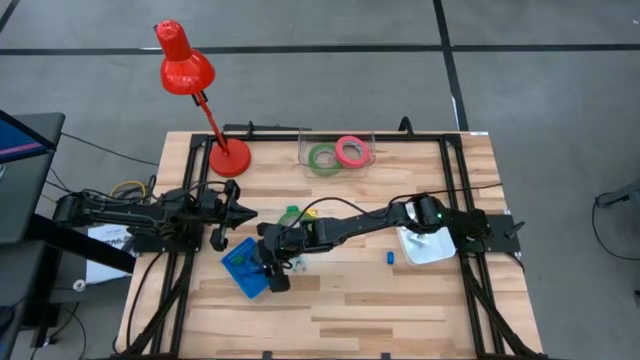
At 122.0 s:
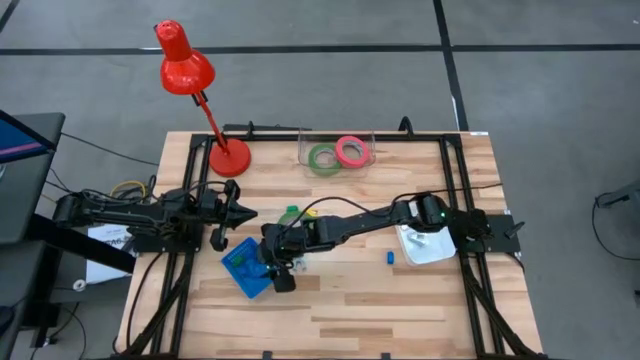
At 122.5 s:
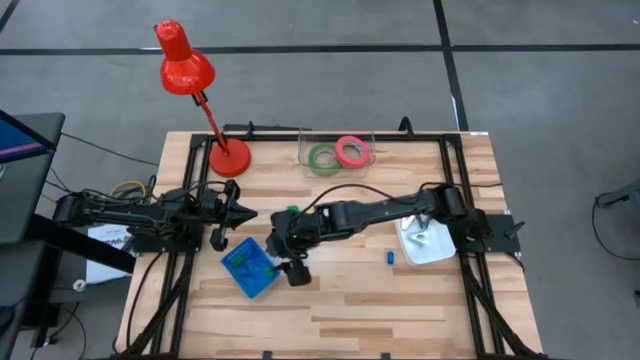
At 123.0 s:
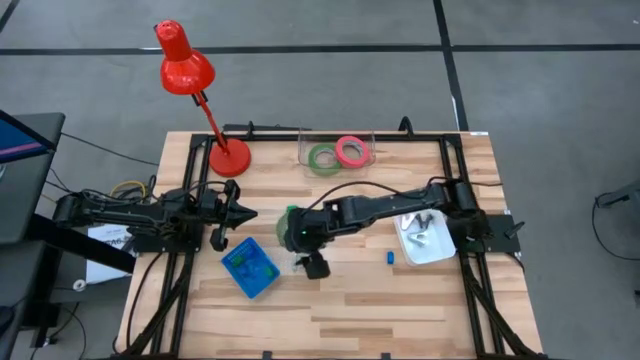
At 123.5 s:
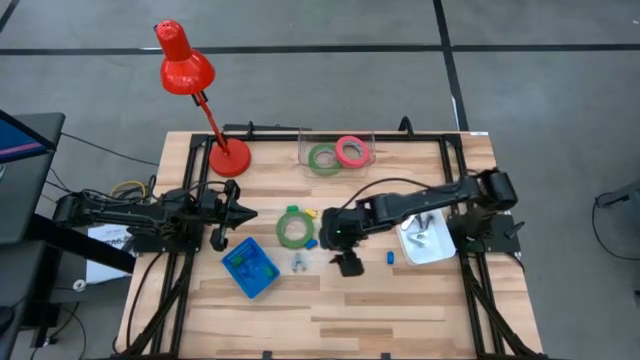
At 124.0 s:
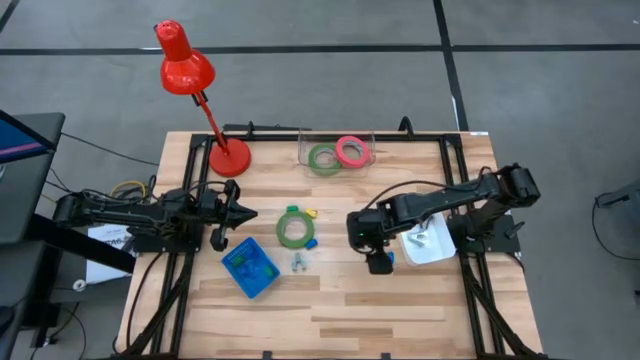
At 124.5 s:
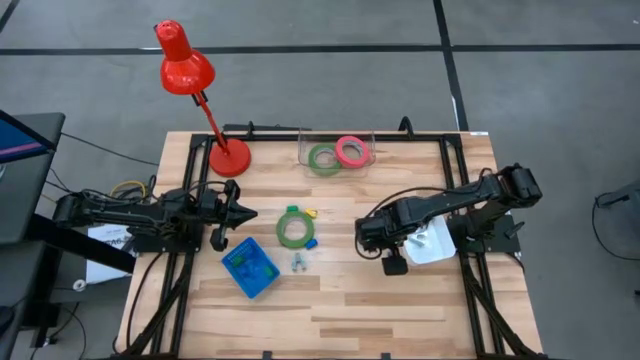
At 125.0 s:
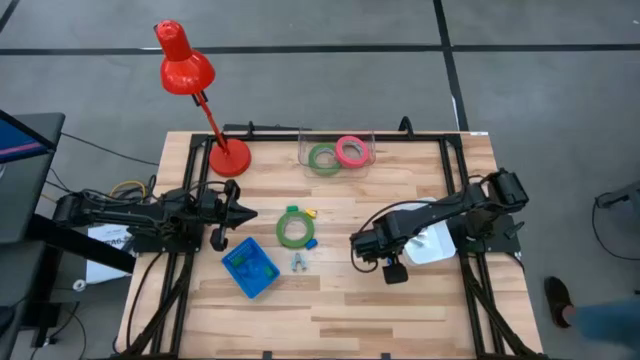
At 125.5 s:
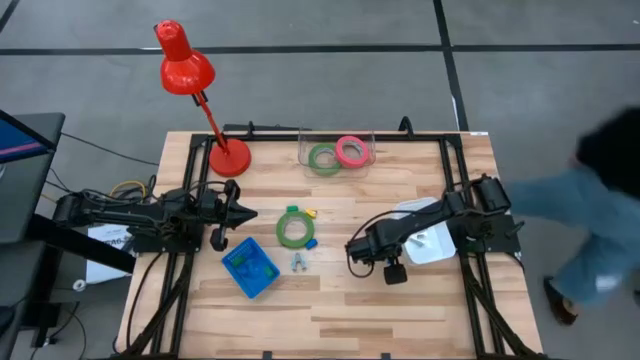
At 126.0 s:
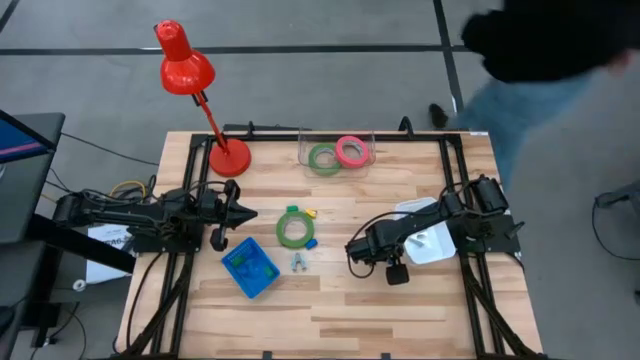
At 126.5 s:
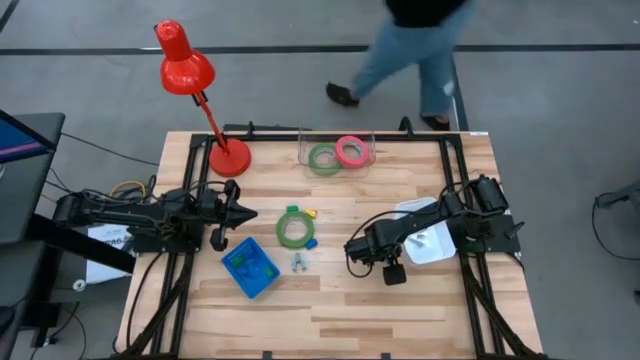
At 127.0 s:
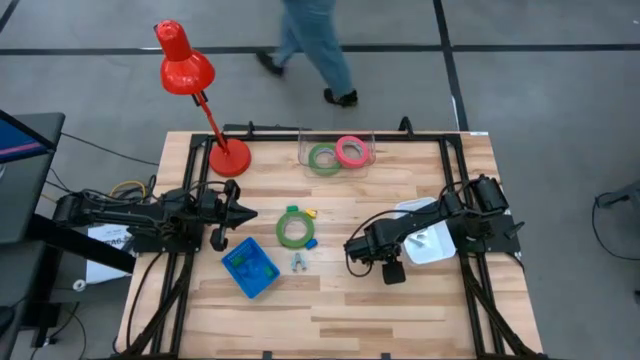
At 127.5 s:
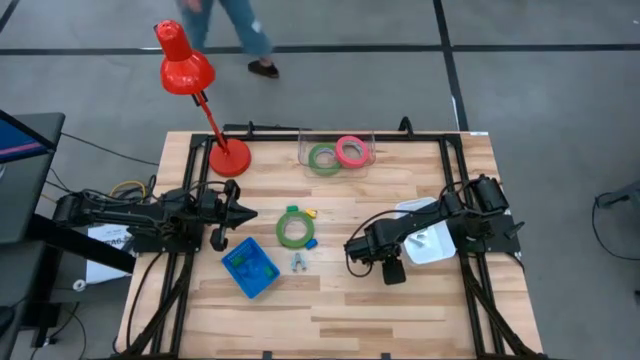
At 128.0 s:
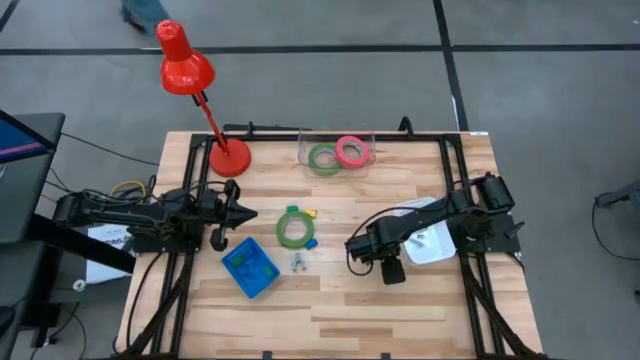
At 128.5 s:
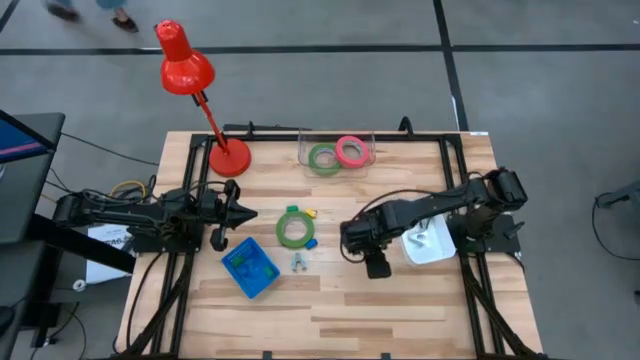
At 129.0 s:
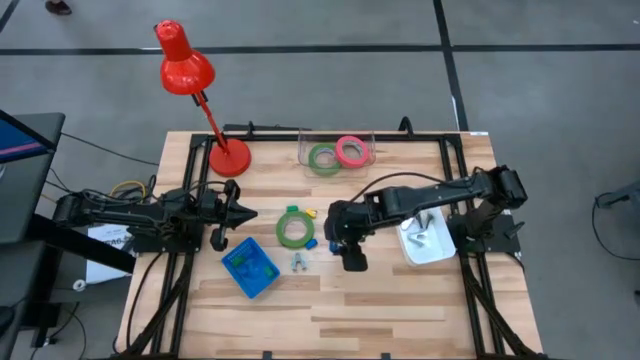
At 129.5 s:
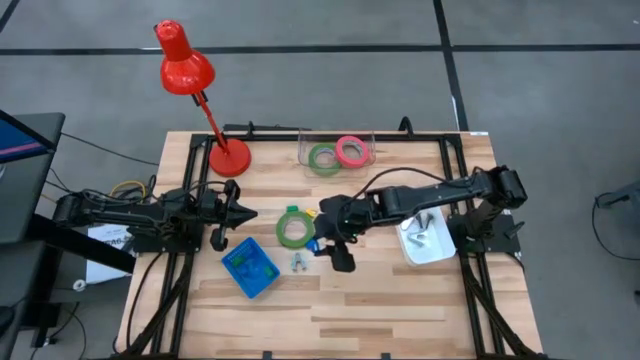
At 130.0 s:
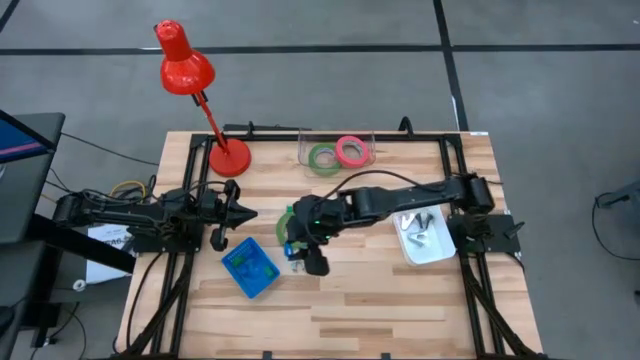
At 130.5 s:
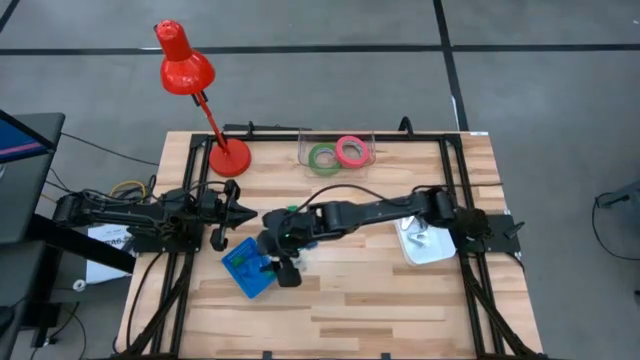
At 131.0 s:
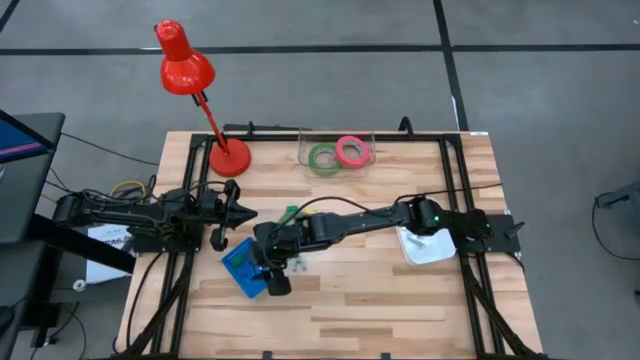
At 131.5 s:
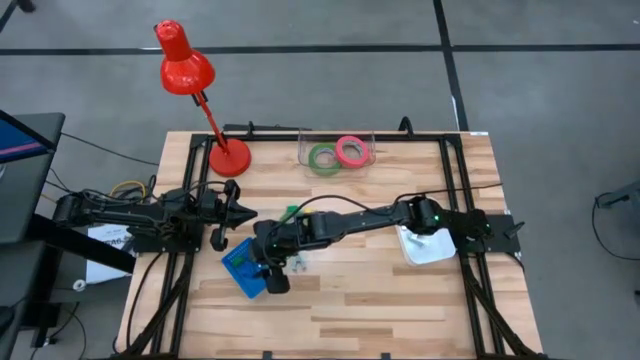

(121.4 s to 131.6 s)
Task: Pick and place Stapler, Stapler remover, tape
Put the right blue stapler into the blue bin

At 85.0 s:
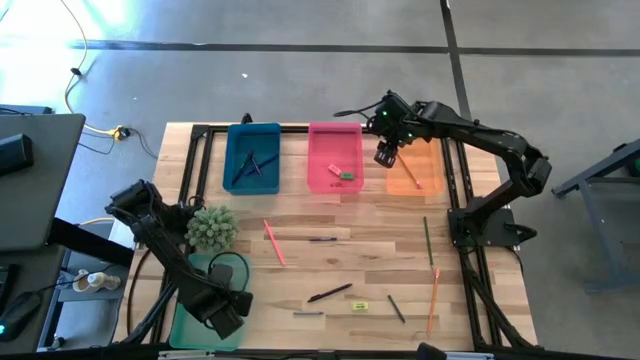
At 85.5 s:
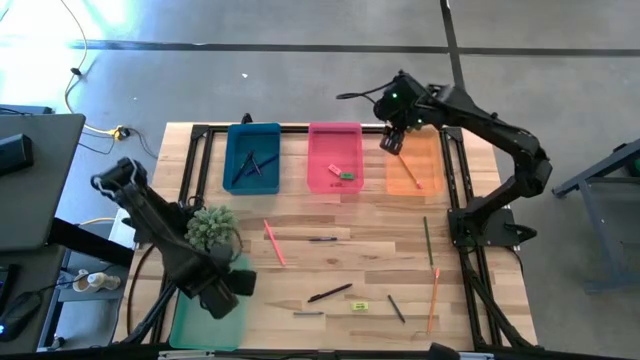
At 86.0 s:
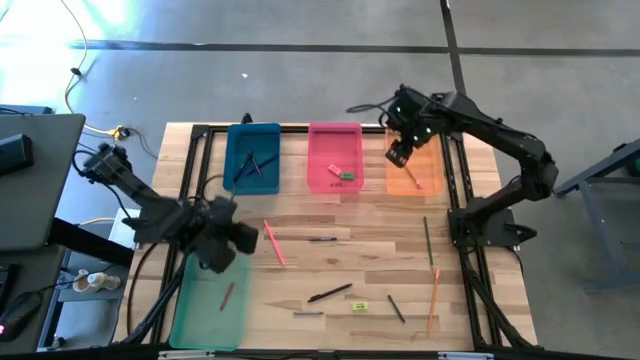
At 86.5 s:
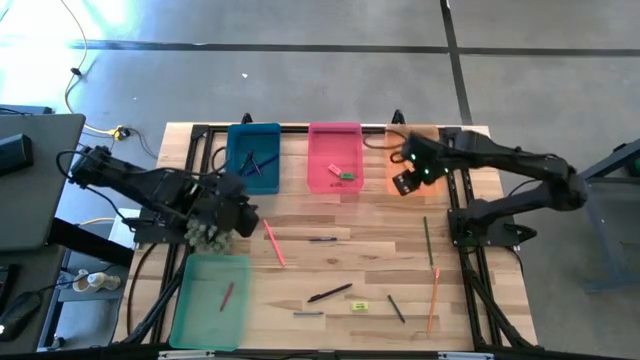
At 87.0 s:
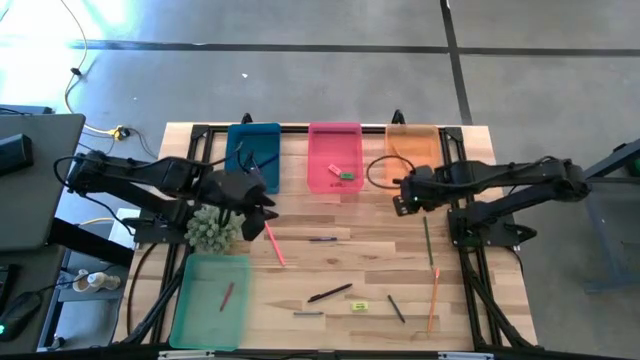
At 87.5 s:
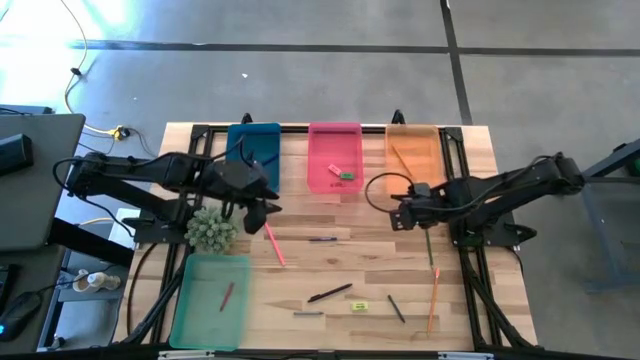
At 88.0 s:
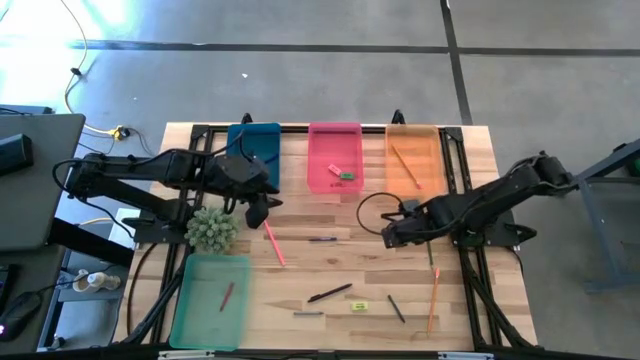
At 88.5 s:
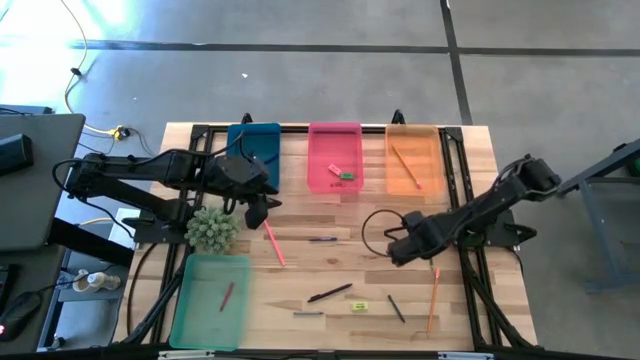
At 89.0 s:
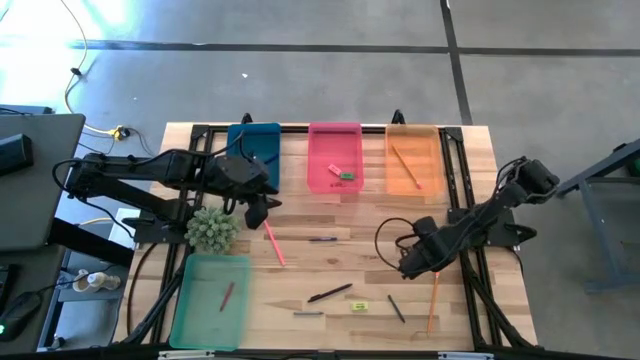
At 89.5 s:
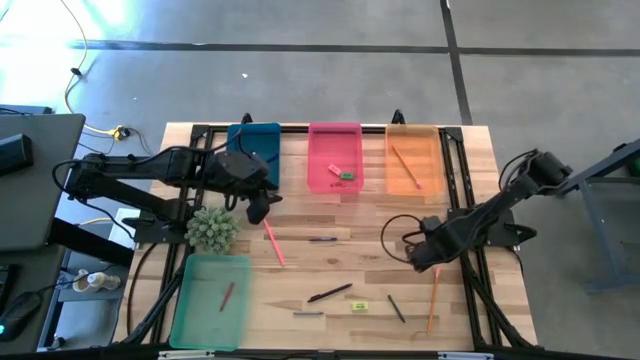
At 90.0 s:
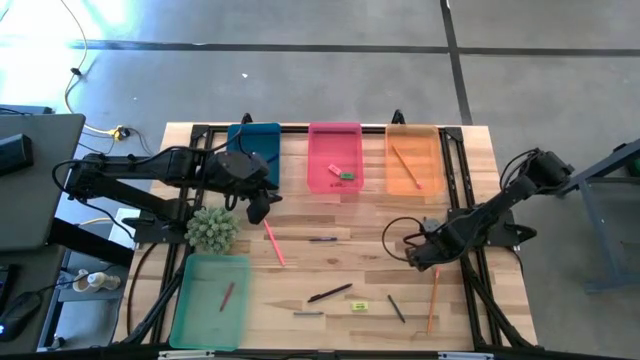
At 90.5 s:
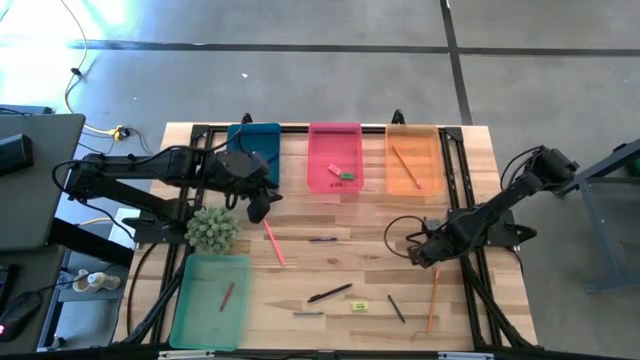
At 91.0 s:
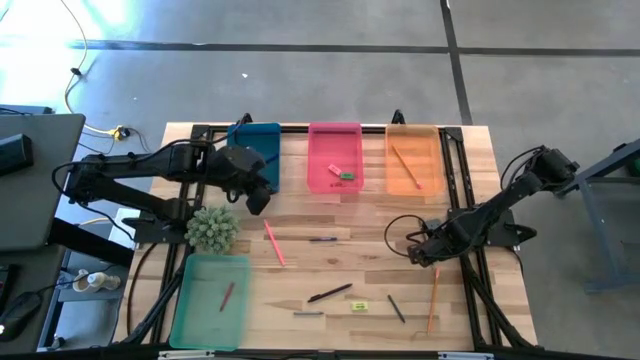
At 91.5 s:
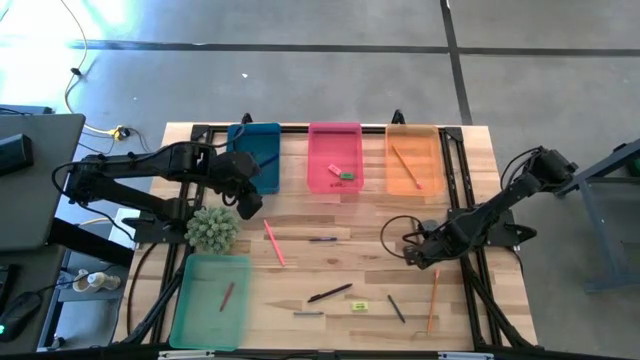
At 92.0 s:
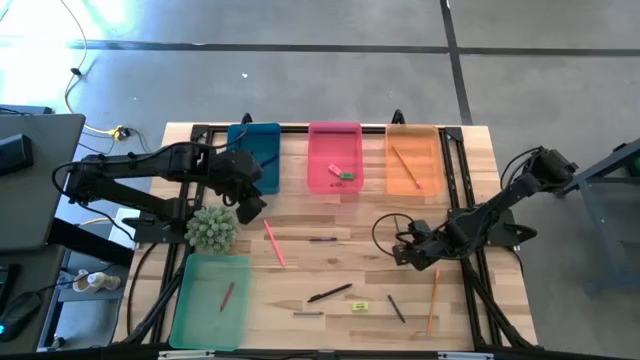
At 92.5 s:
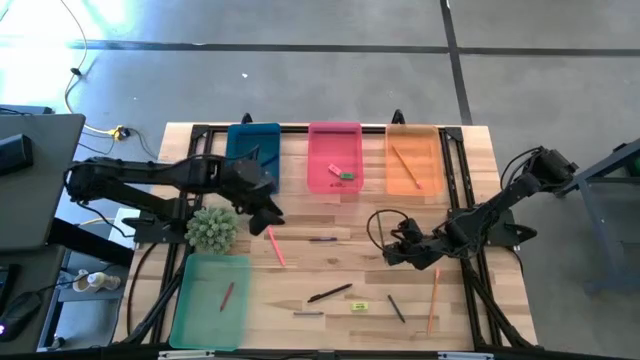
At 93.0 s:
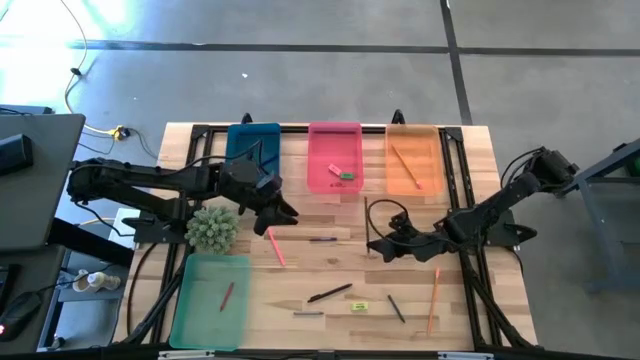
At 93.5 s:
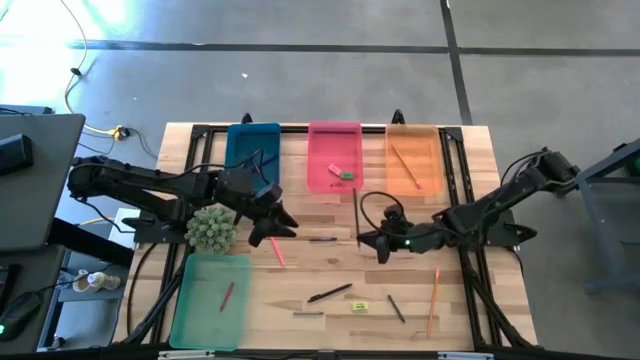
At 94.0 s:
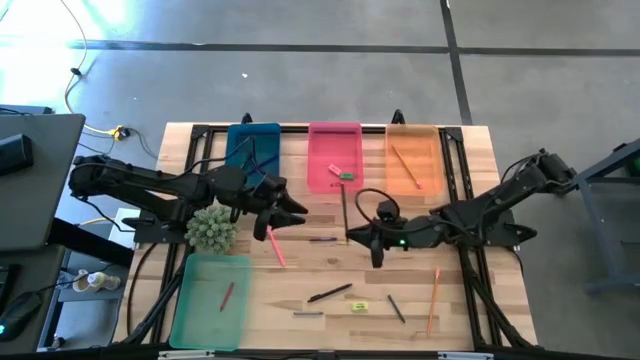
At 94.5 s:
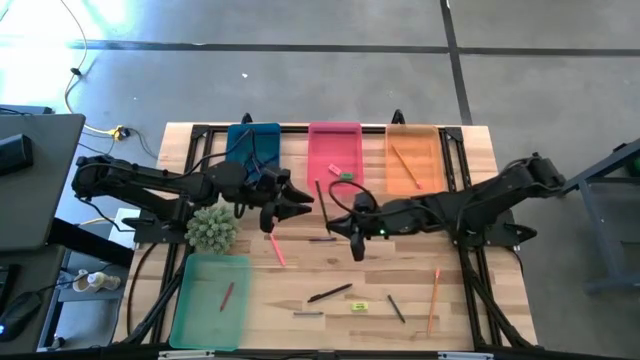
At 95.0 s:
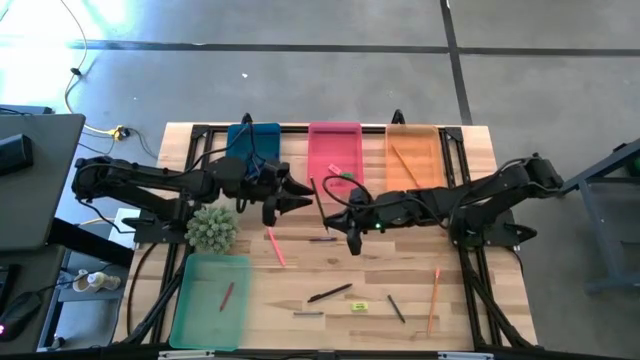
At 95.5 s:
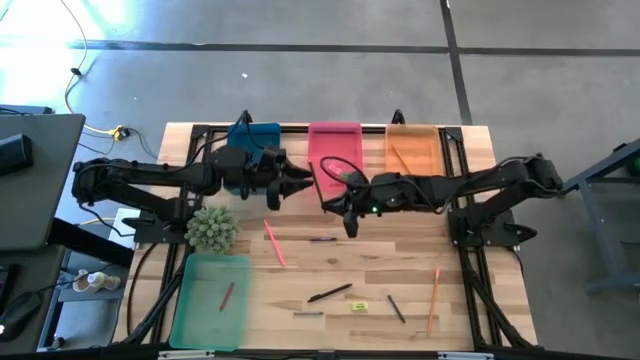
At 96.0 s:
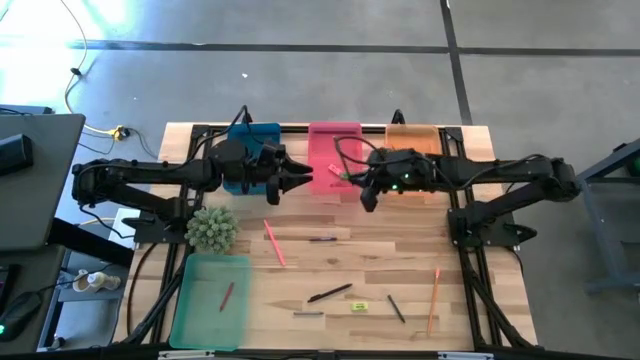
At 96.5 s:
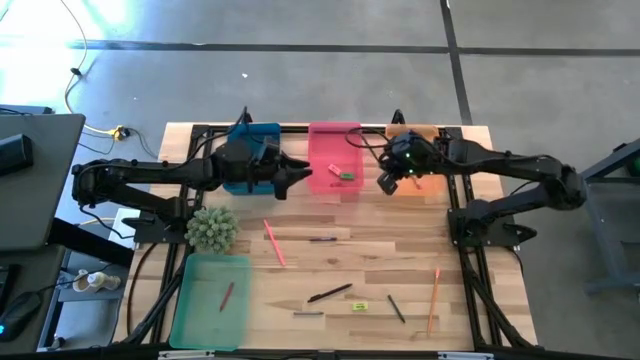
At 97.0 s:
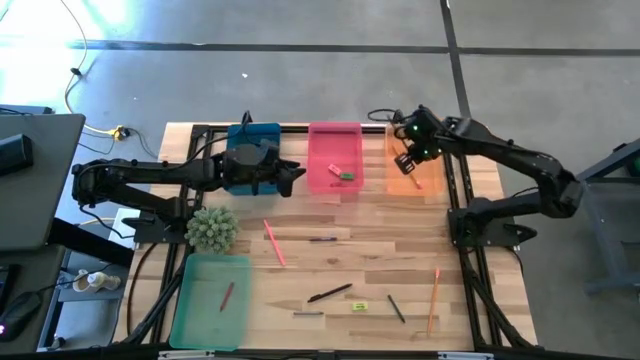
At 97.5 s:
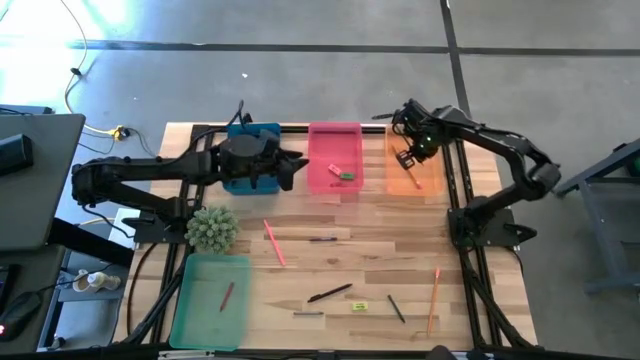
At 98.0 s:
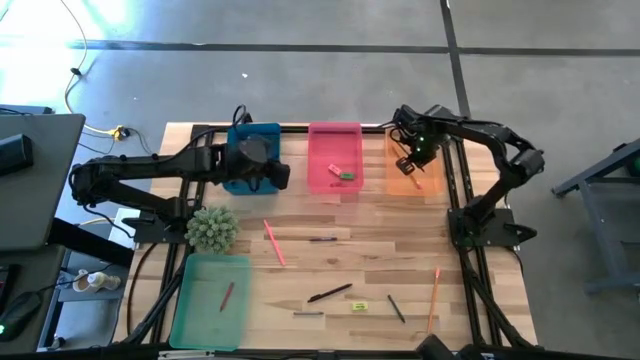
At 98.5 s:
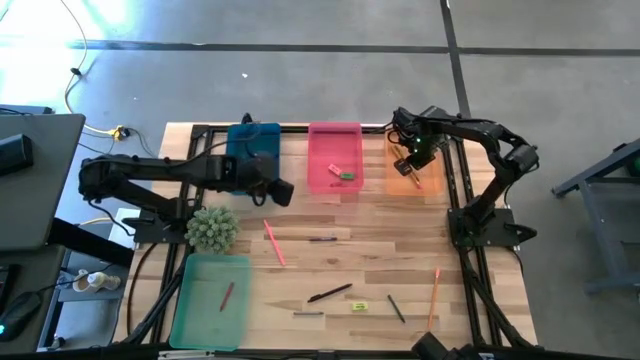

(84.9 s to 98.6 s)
Task: Sort crayons/erasers/pens/pencils in bins
Put the green pencil into the orange bin
